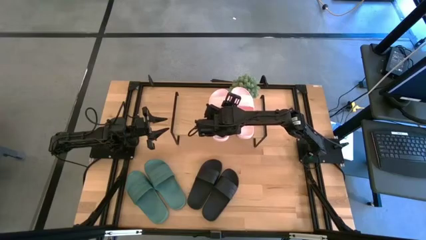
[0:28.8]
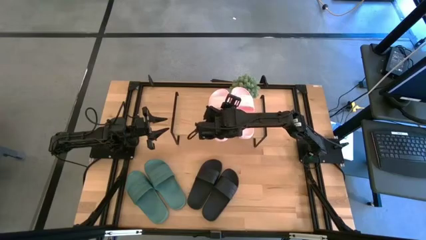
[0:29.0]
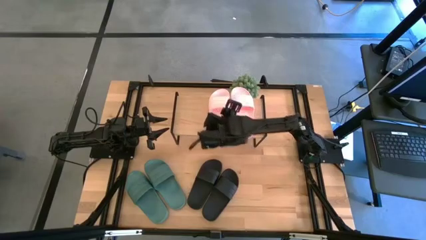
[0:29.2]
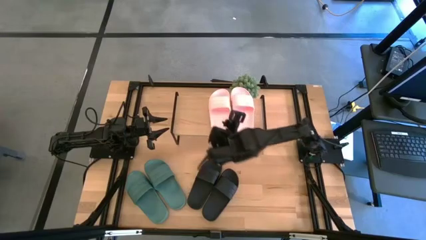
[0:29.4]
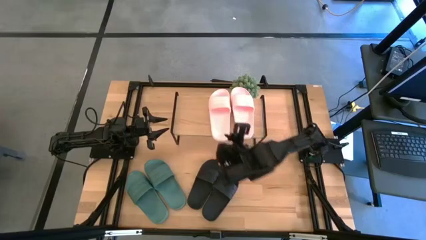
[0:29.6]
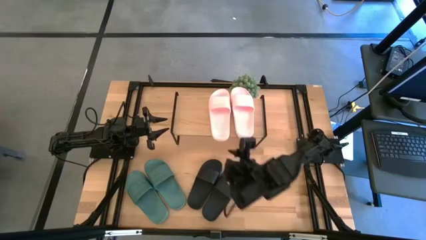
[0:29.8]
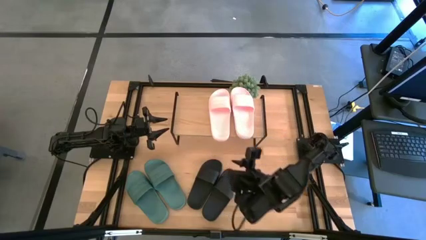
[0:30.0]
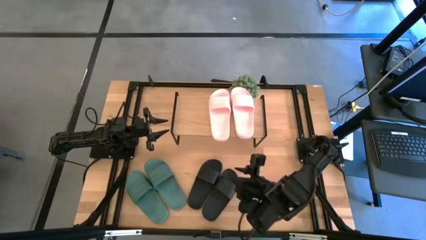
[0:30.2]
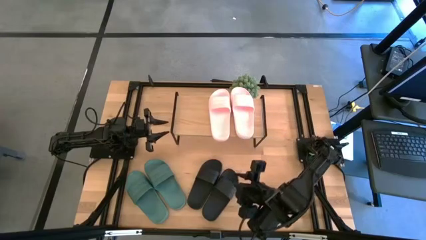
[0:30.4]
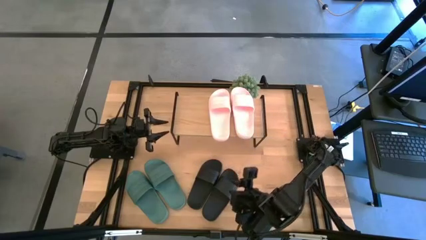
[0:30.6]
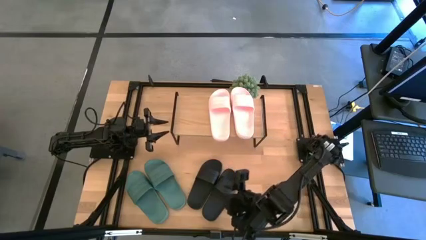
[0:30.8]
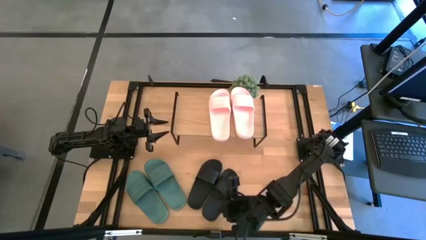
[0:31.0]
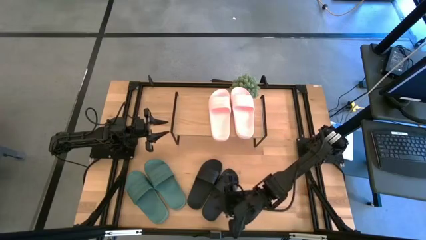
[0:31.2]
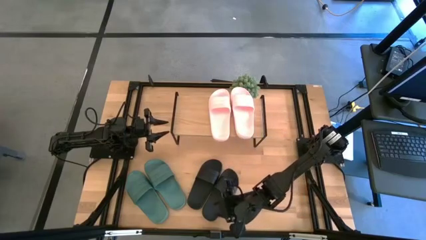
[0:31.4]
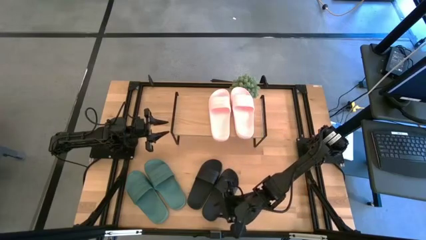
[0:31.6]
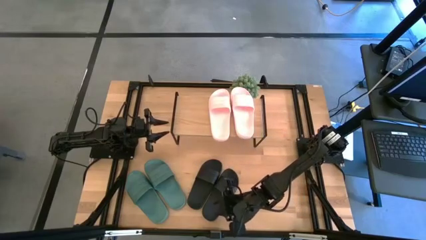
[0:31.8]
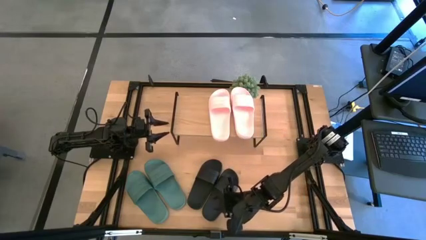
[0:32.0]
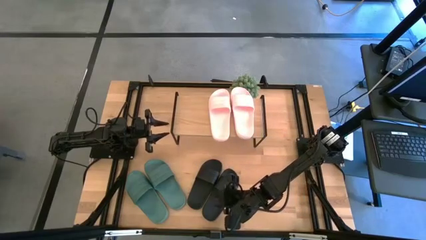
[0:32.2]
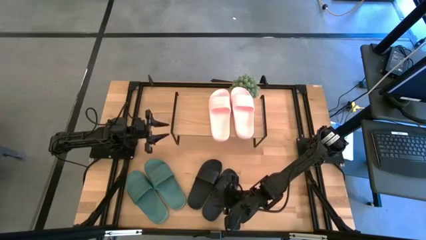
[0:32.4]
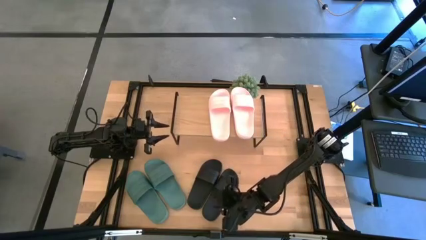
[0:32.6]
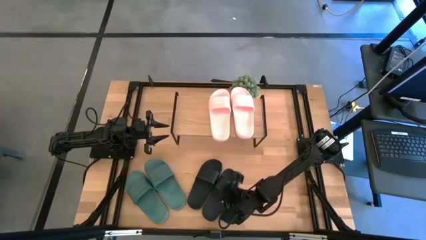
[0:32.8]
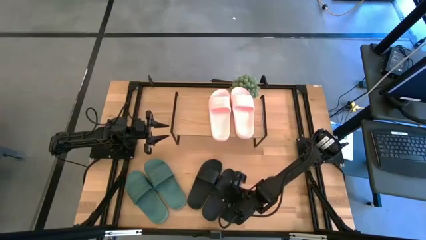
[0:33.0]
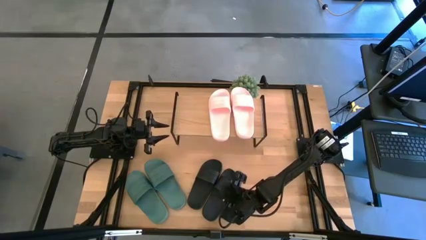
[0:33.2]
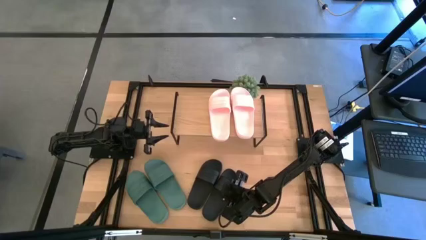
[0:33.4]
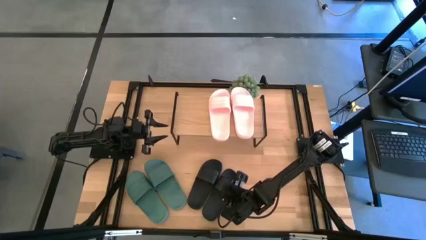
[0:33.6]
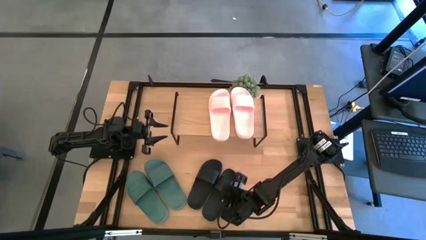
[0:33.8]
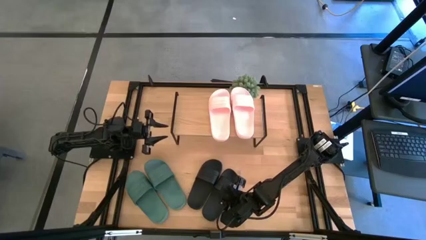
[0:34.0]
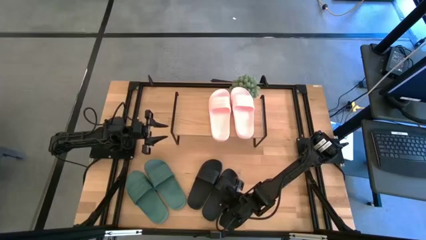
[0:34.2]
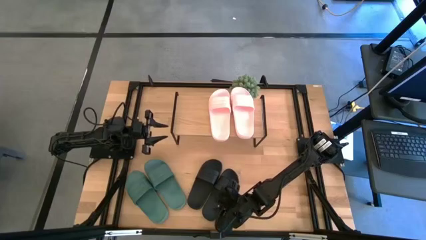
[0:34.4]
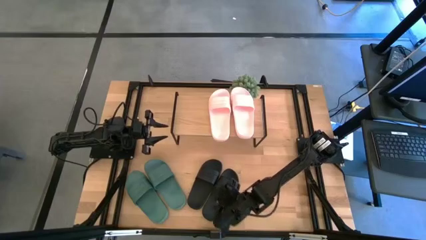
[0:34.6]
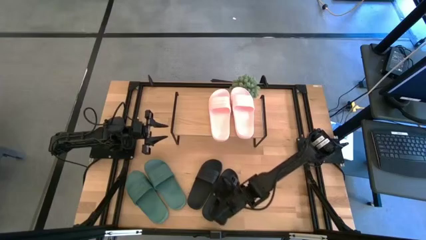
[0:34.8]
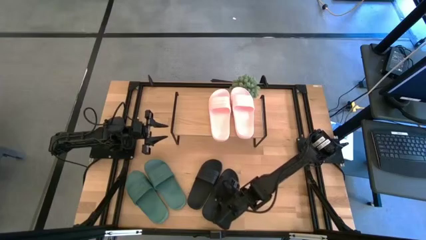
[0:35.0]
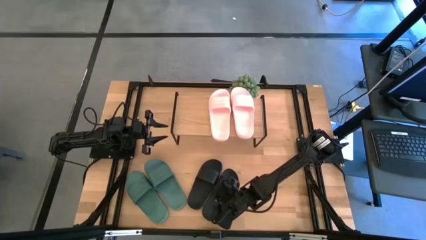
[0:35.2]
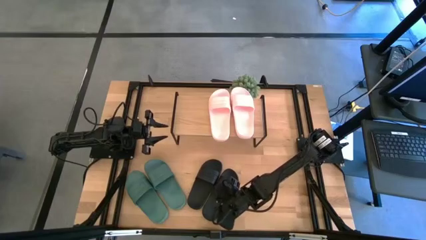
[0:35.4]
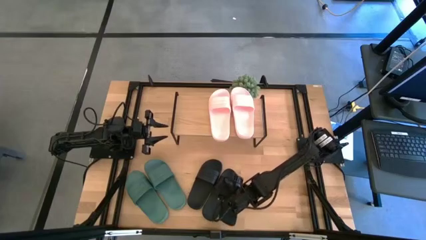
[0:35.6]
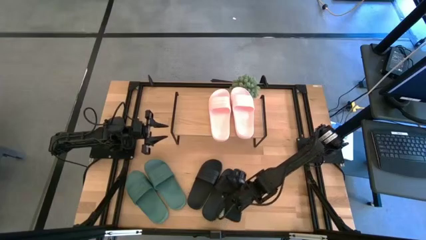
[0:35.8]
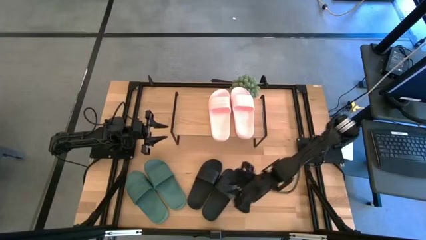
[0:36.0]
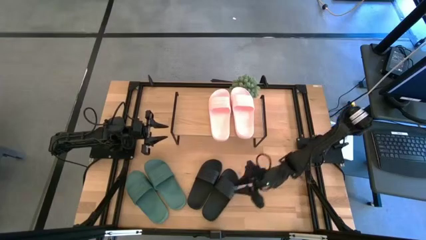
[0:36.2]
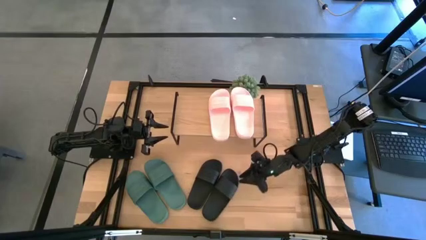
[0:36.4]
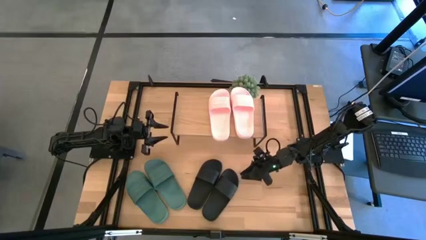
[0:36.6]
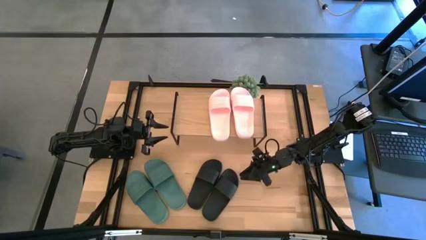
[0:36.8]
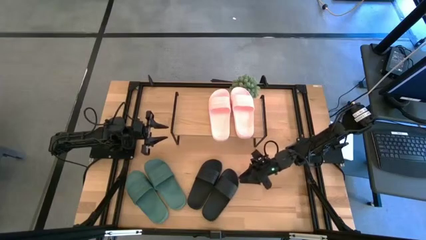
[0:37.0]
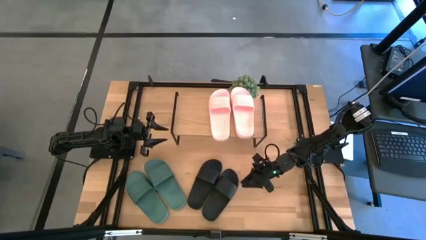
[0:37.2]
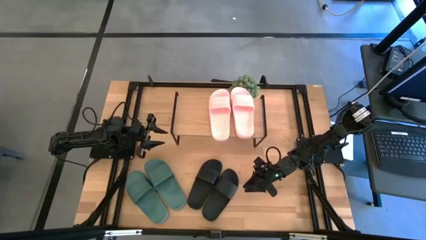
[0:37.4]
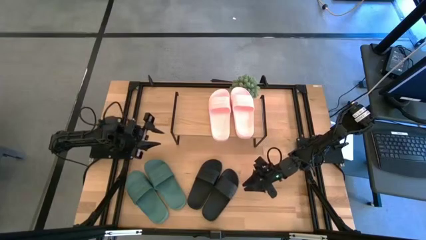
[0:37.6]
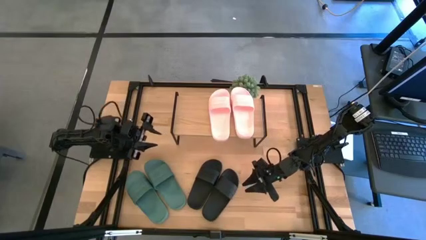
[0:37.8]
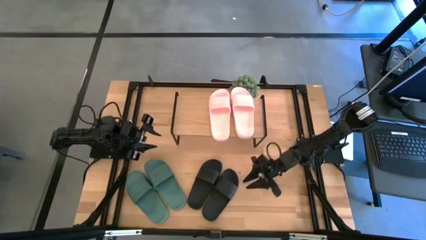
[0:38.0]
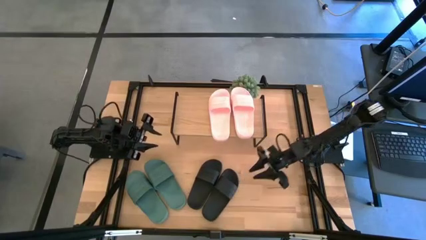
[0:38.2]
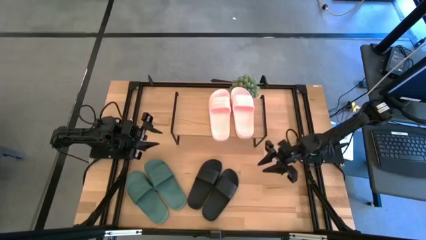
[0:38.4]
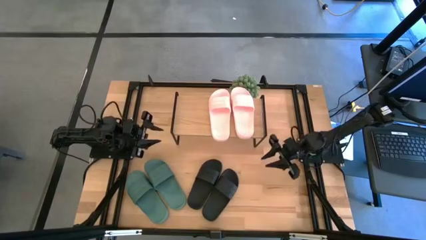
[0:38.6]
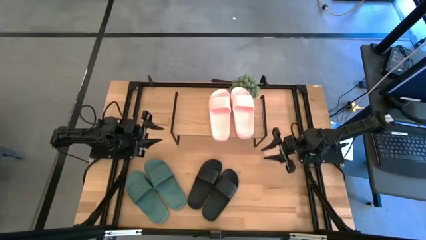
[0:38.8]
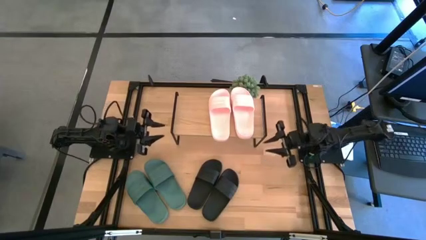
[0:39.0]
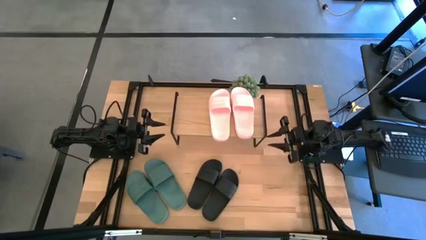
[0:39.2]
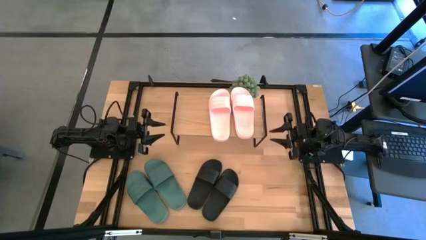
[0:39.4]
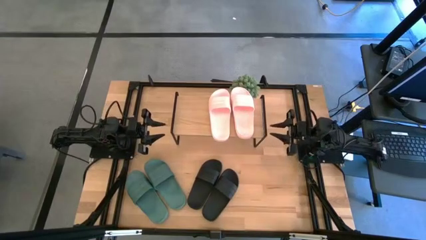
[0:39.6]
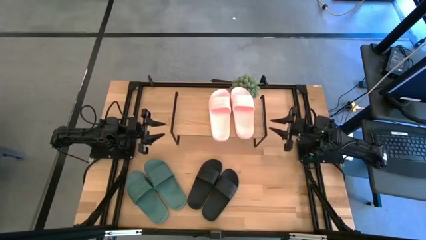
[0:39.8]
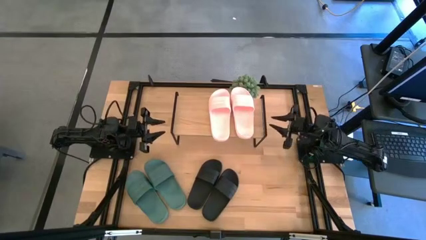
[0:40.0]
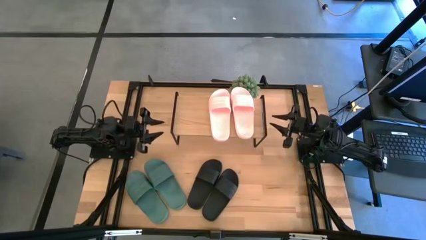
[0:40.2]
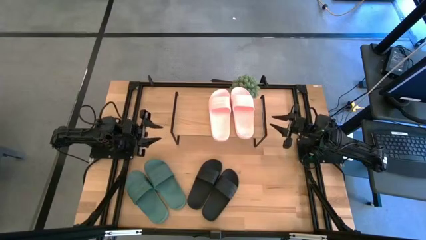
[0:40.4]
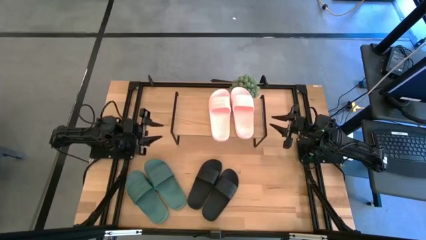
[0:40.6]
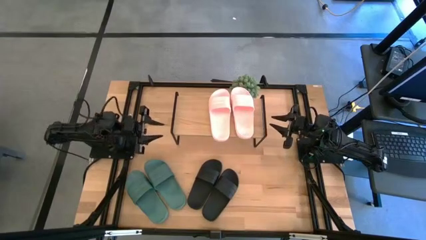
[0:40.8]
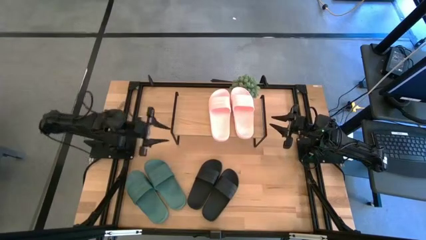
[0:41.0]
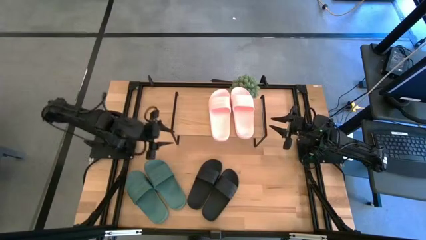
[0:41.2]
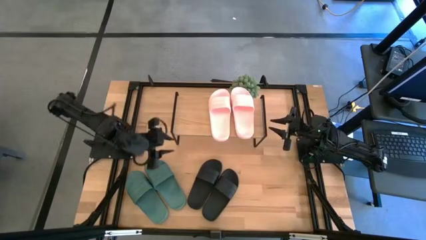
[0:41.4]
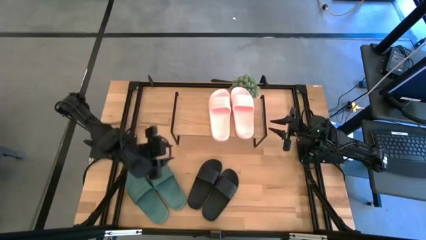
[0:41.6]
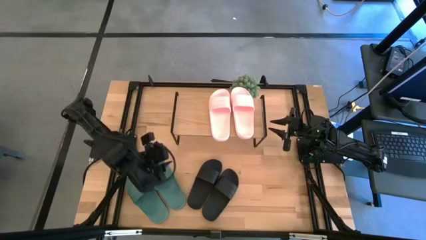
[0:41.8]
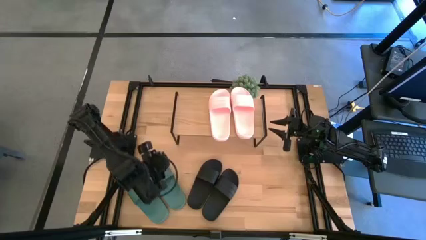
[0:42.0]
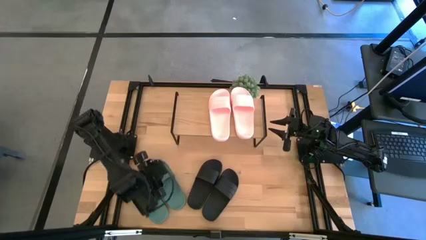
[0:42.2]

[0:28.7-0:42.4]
Task: Pick and place slides into the shelf
Put the left green slide under the shelf
